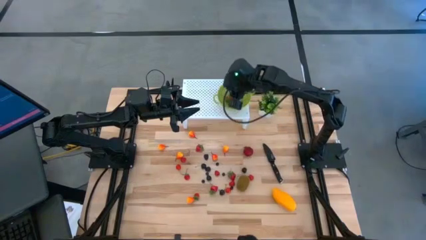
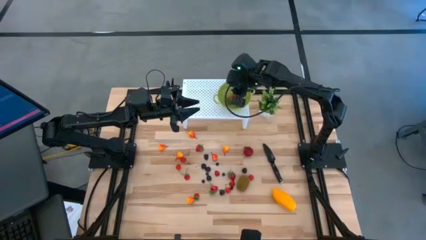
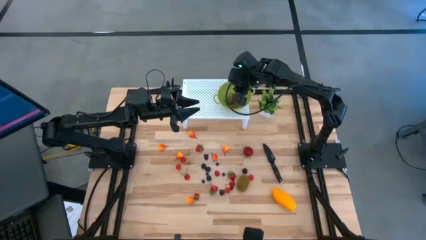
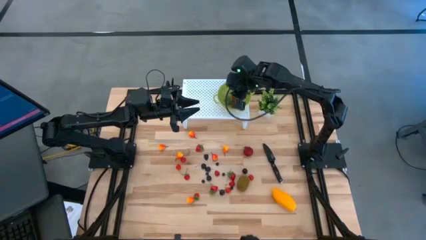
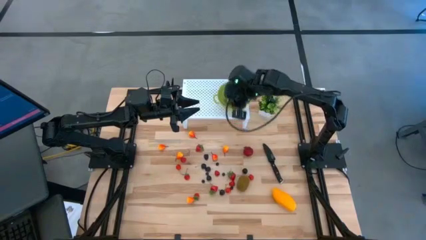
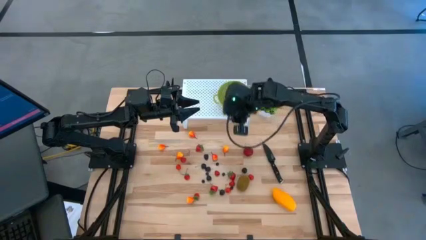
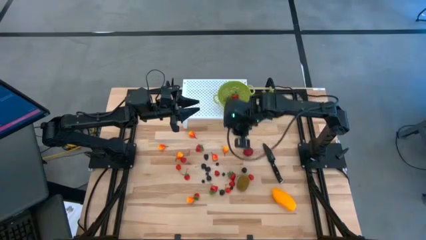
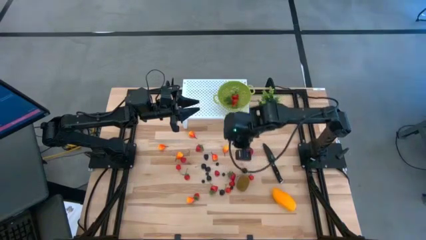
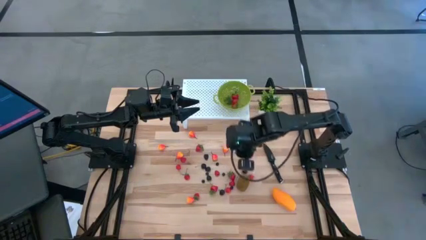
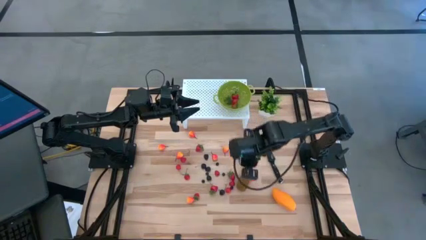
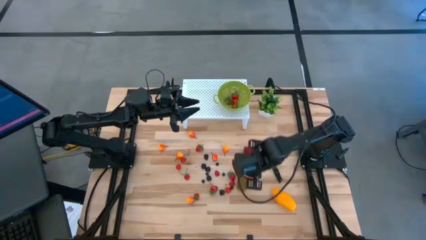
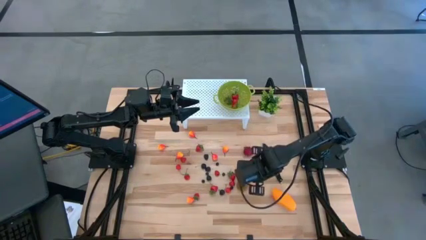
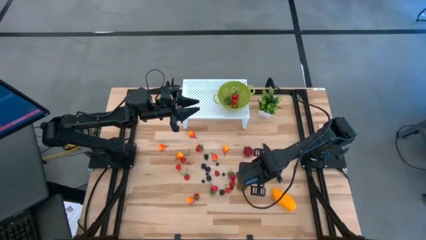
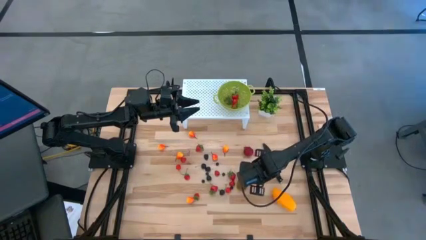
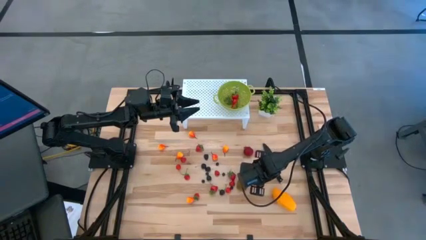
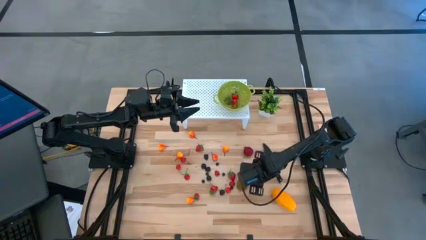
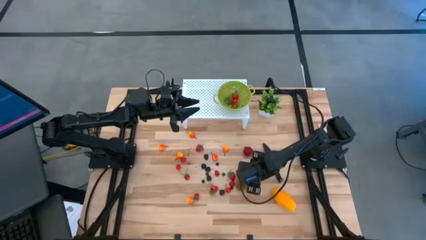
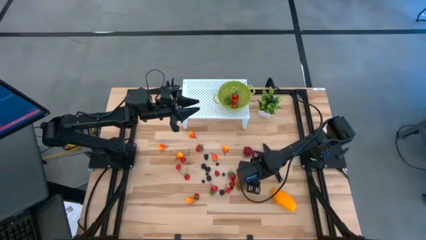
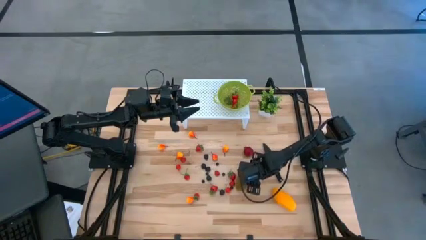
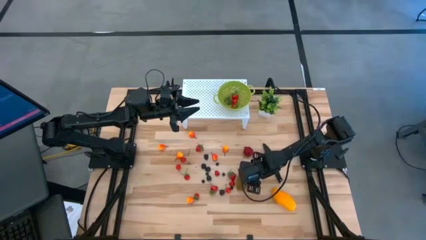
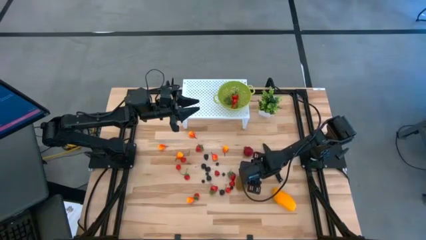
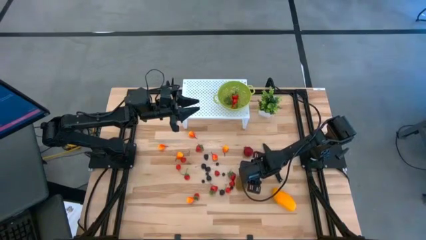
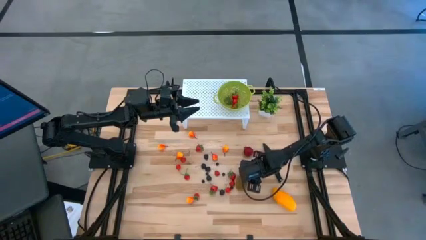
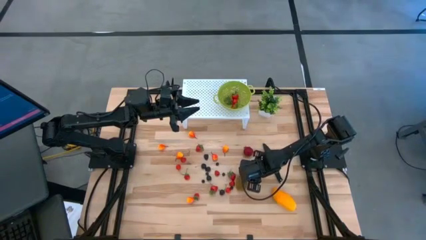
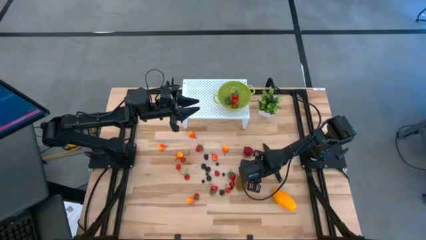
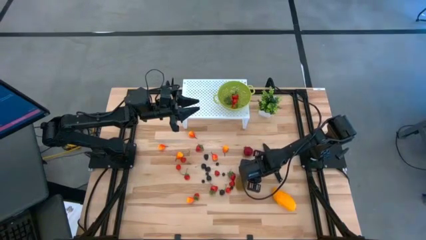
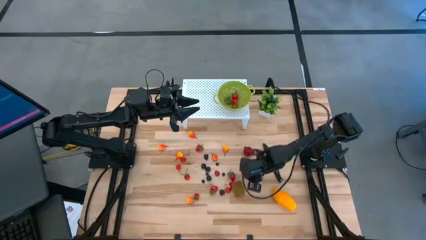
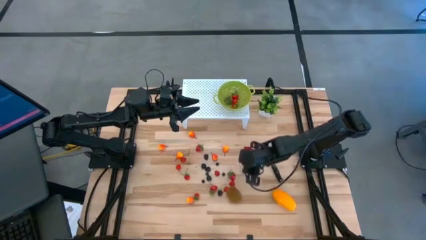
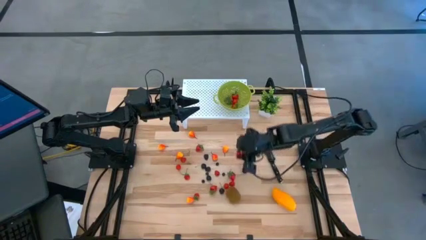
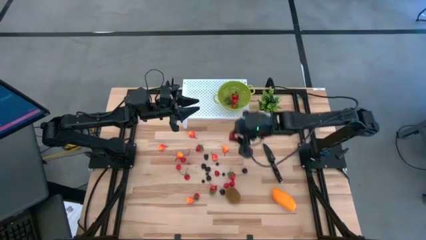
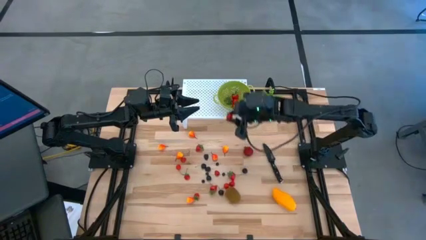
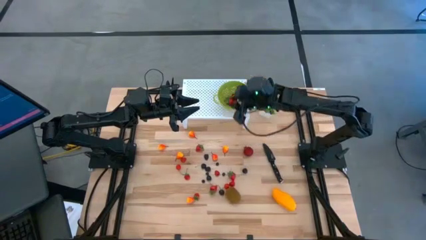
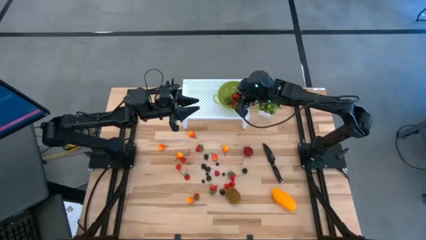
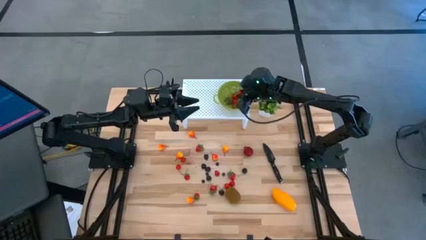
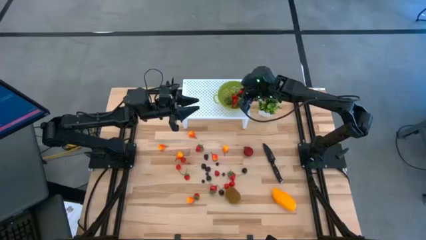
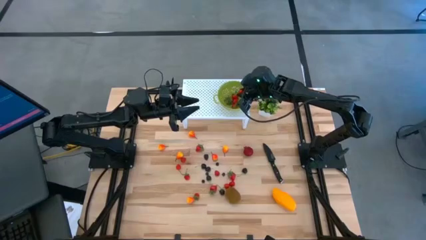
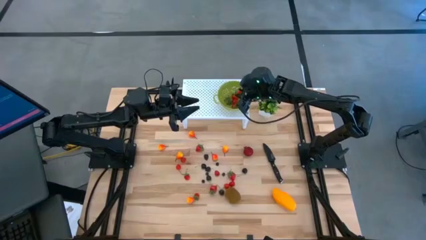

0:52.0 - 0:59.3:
Task: Pick & Place Fruit
Put the red cherry into the green strainer bowl

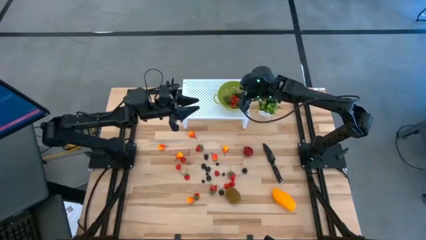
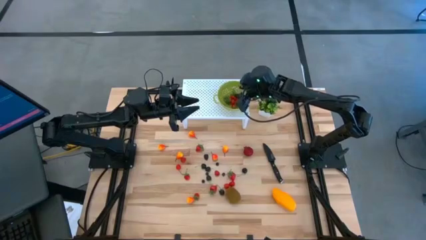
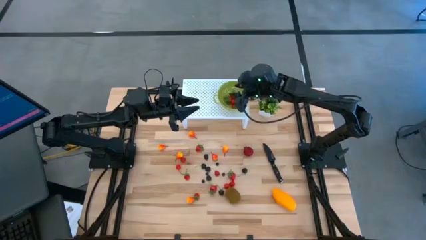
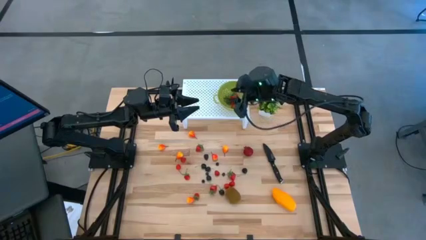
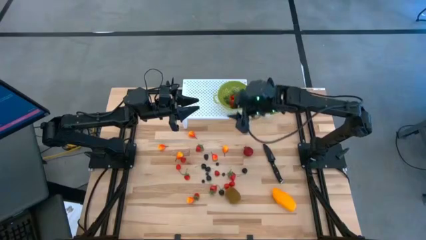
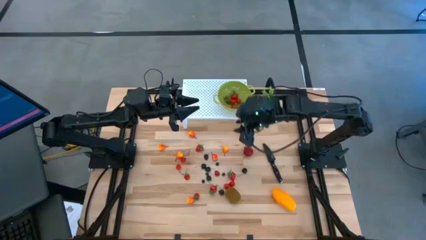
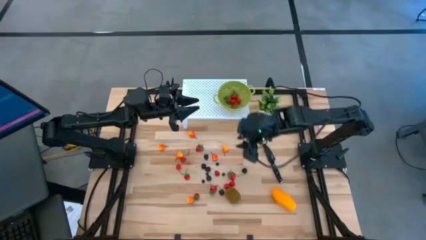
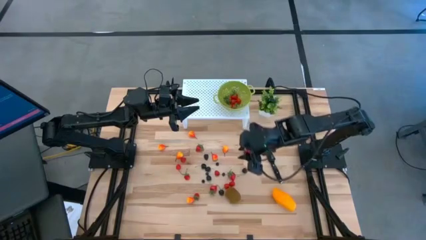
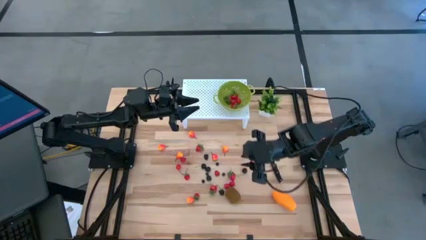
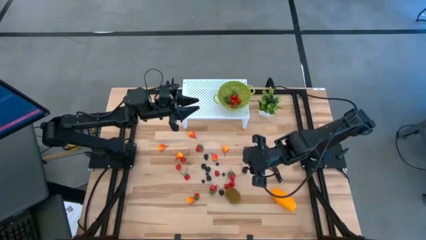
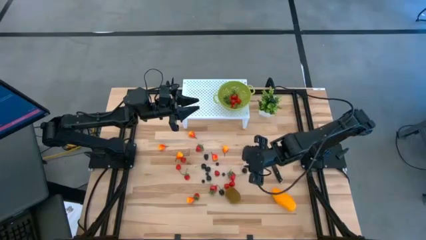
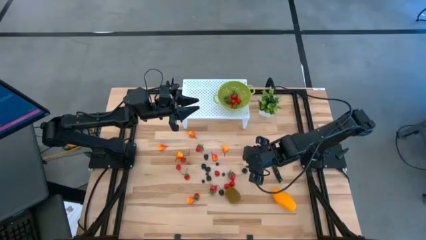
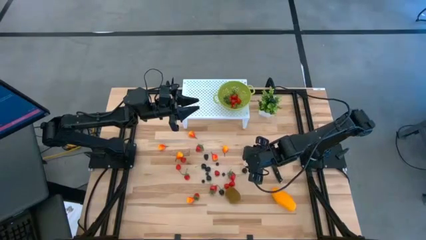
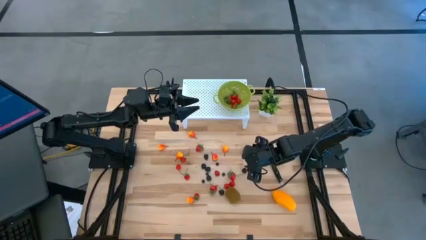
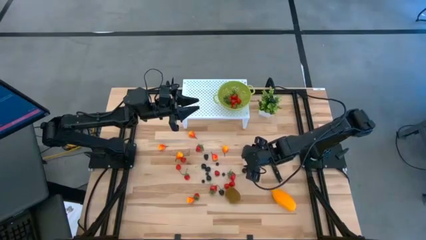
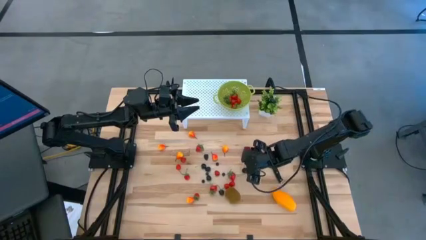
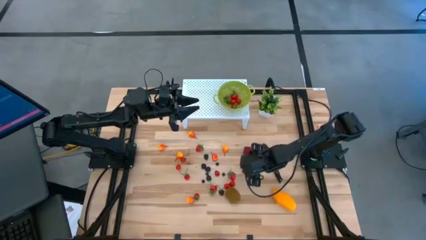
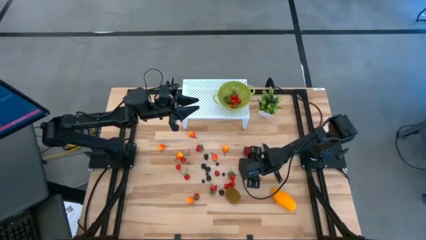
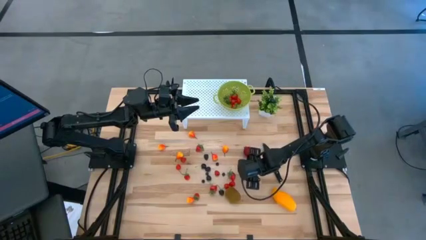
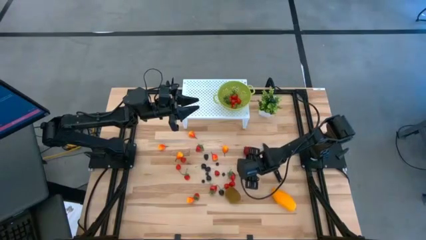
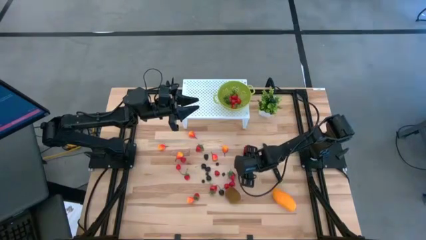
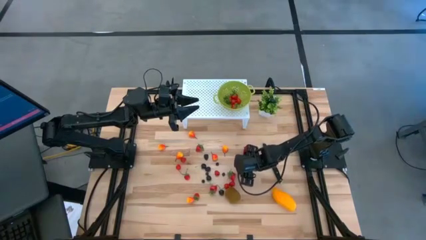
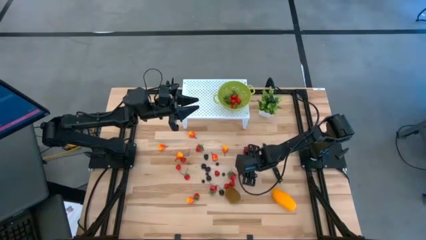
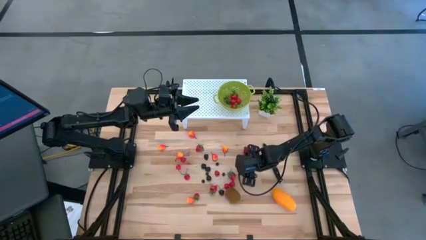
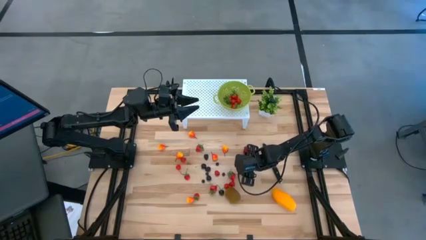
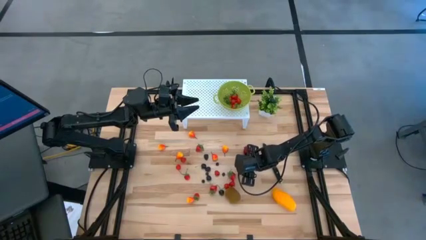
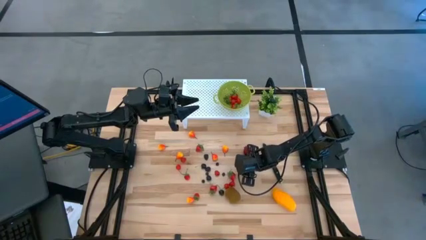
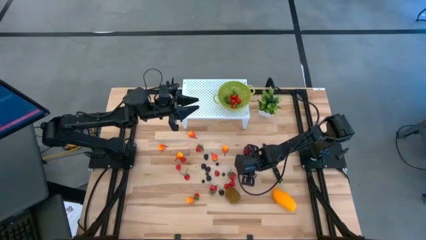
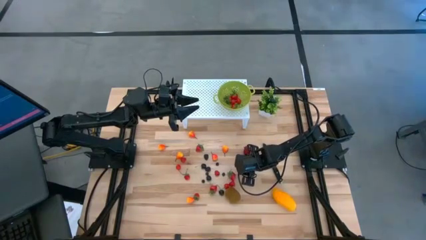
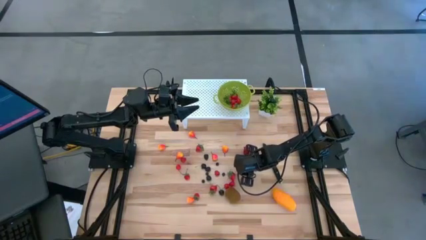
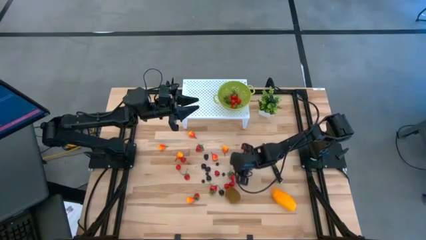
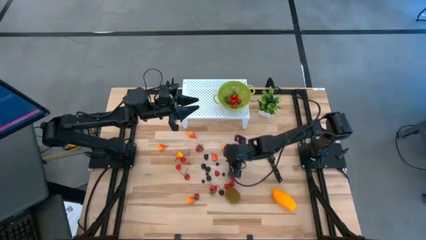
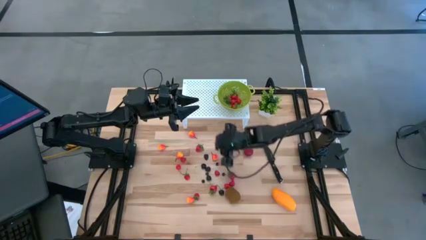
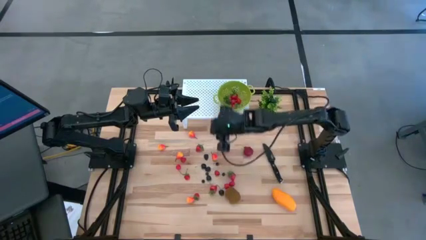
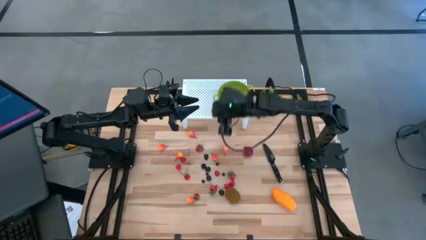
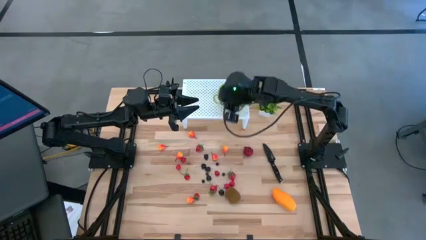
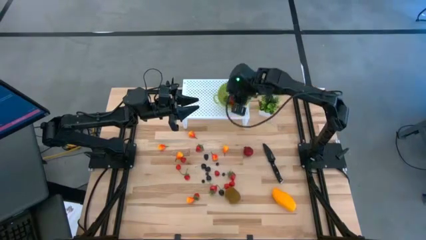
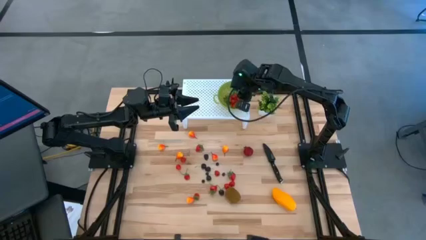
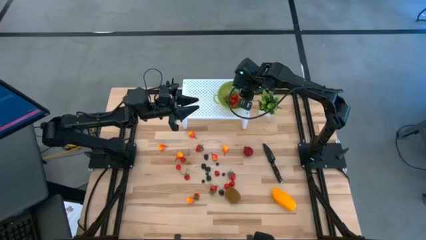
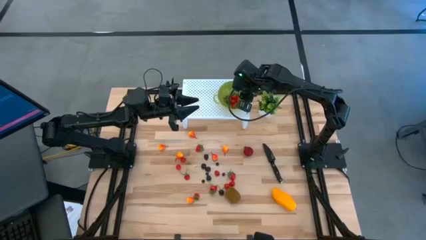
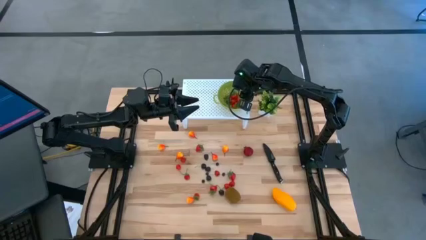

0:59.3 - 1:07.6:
Put the black cherry into the green strainer bowl
